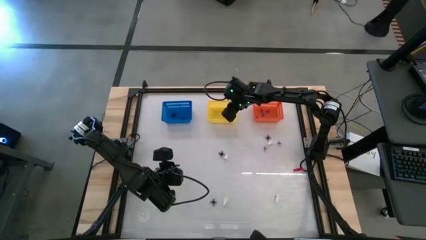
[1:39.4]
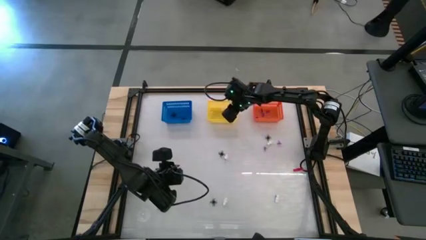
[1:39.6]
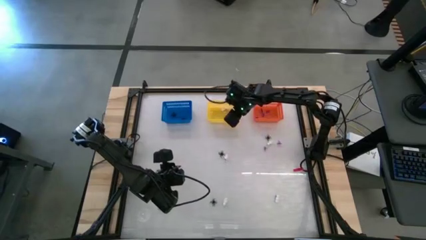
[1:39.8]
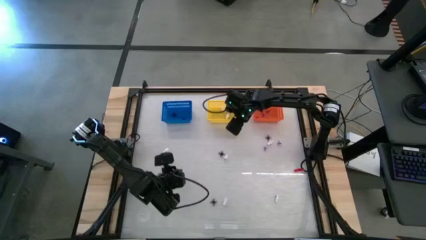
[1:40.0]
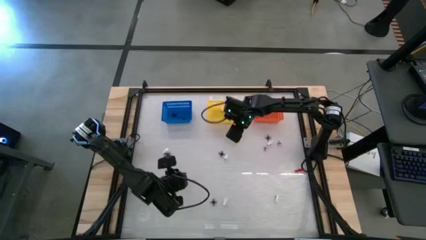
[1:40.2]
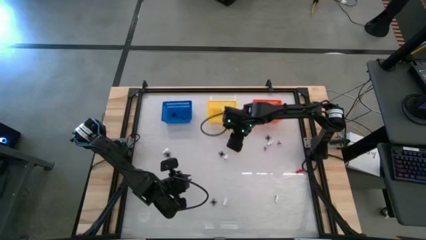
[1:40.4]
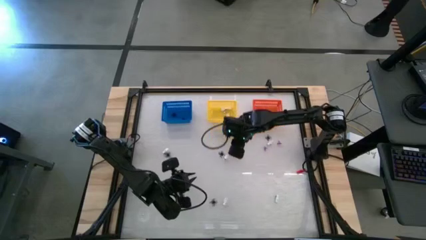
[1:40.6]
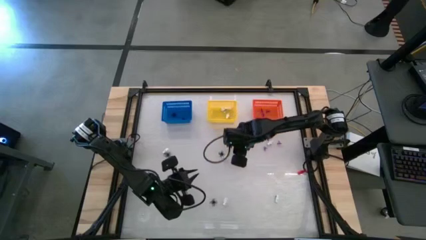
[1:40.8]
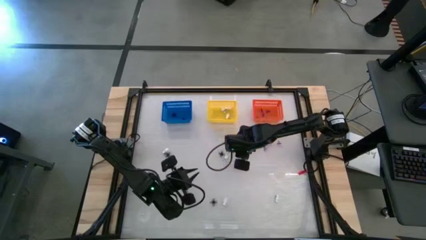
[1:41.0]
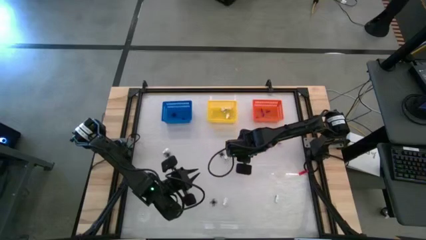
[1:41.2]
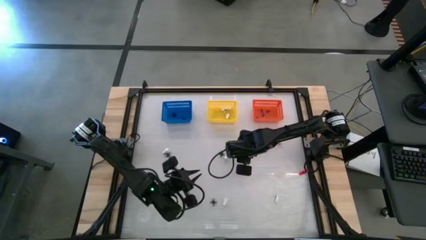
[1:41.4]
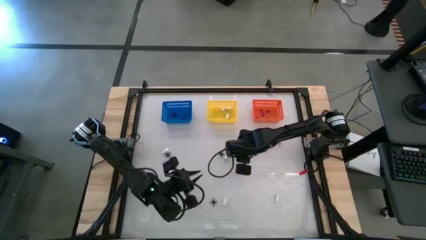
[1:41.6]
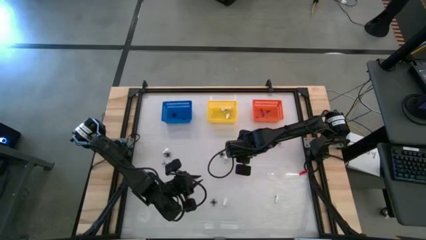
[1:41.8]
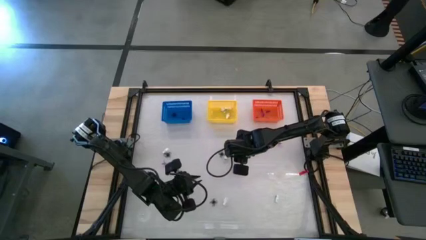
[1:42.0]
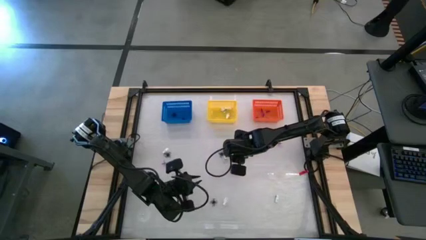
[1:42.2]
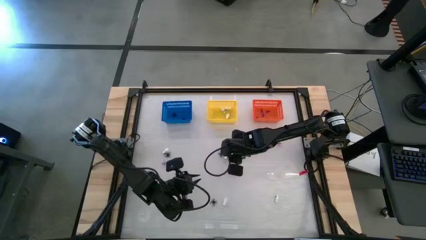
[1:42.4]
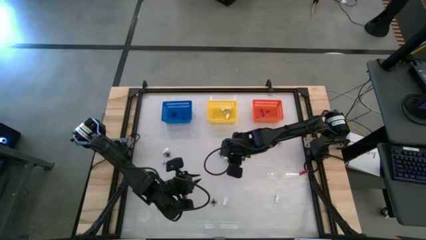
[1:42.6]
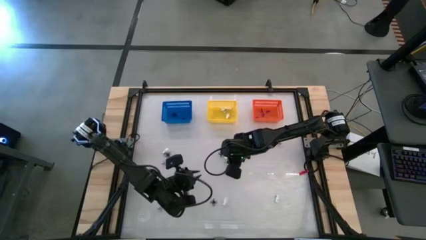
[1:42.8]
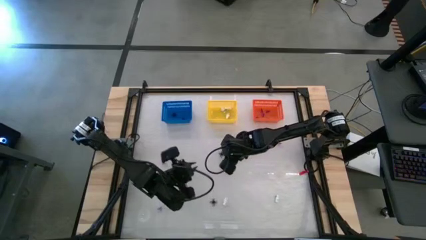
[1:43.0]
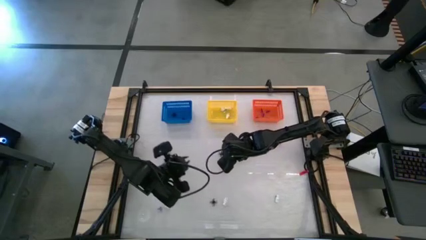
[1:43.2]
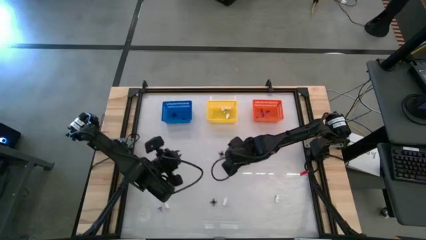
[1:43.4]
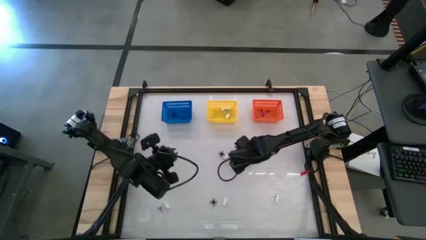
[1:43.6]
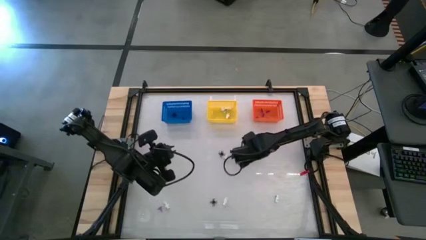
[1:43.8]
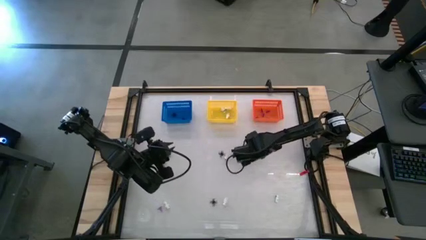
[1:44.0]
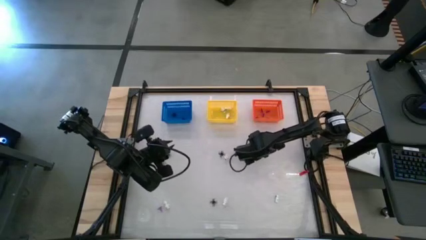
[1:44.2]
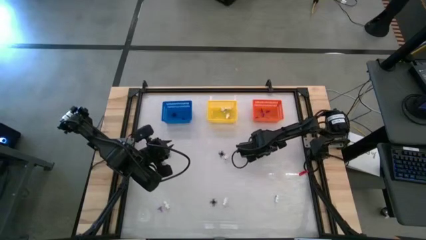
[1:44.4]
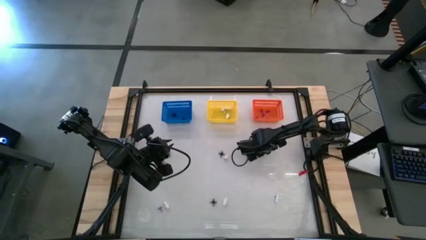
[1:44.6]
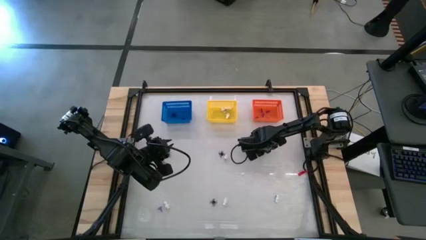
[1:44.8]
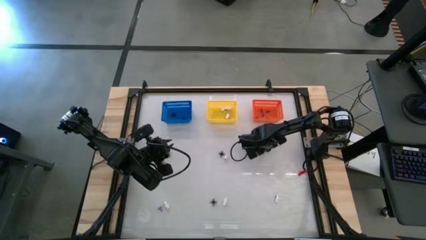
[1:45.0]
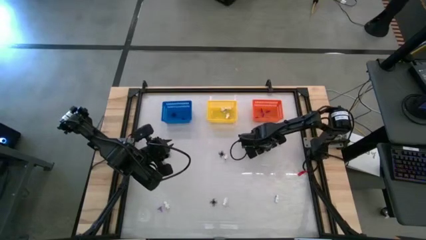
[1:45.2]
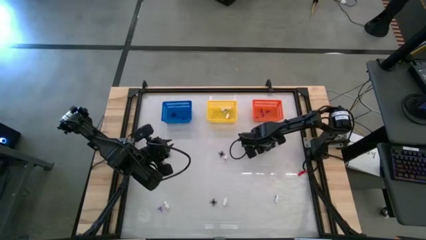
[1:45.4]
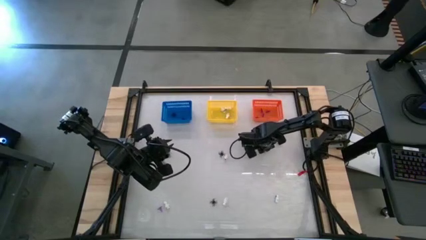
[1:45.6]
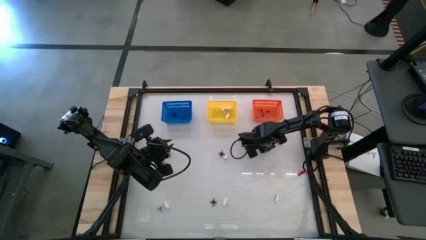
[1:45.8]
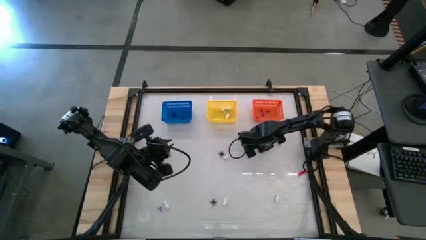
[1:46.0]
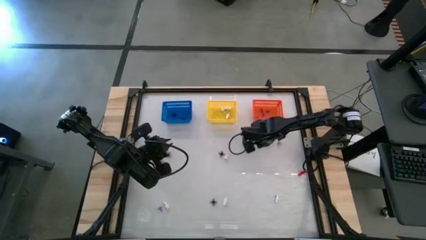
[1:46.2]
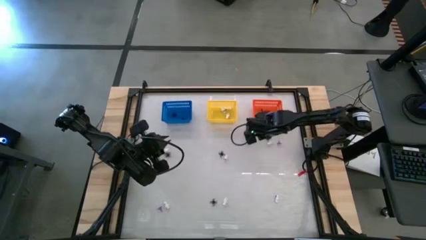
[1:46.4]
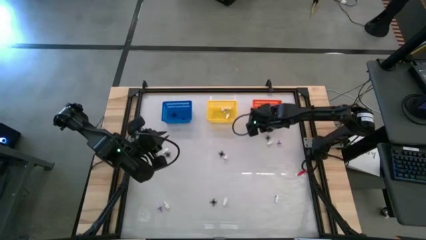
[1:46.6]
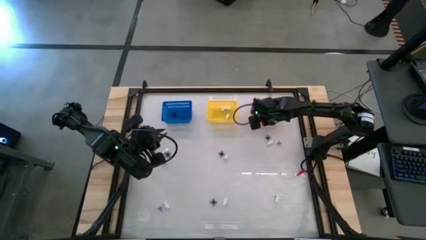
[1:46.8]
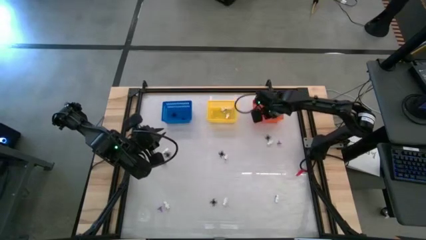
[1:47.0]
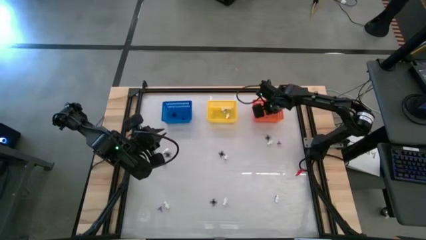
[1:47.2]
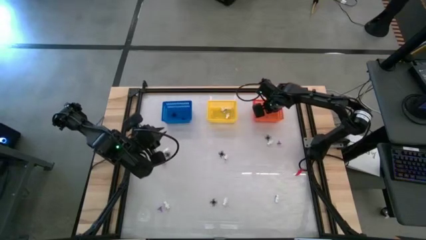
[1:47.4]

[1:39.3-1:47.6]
Task: Sort Halloween decoration
Put the purple witch hat toy into the orange basket

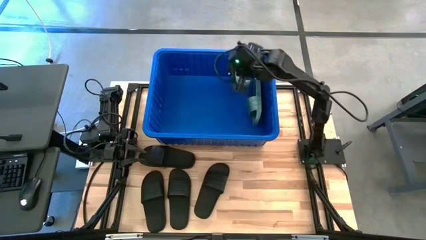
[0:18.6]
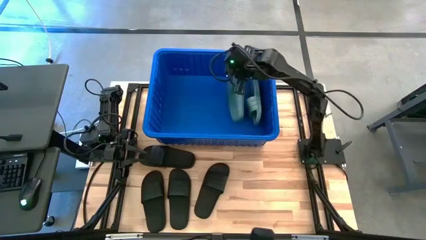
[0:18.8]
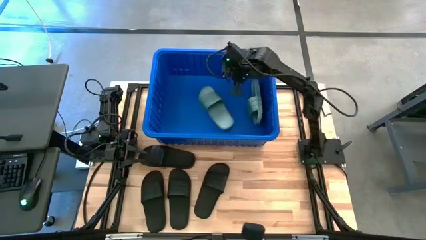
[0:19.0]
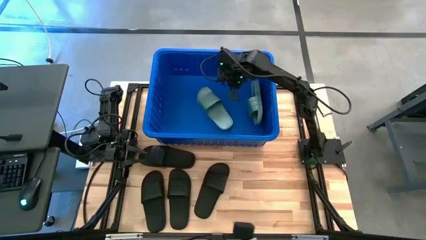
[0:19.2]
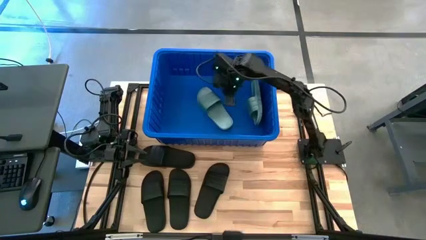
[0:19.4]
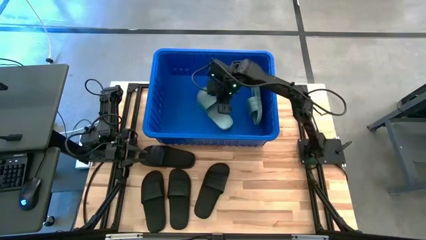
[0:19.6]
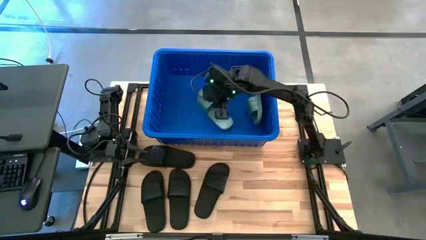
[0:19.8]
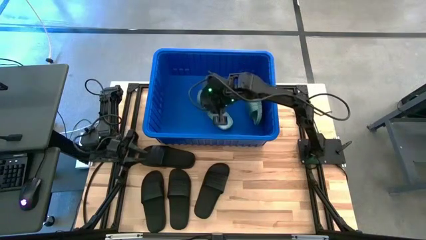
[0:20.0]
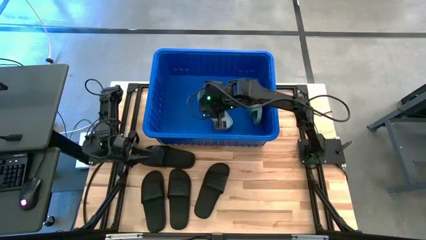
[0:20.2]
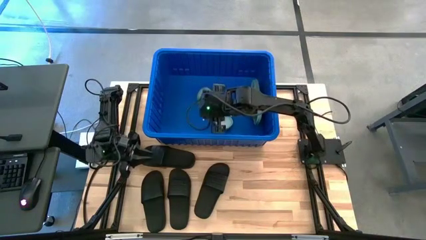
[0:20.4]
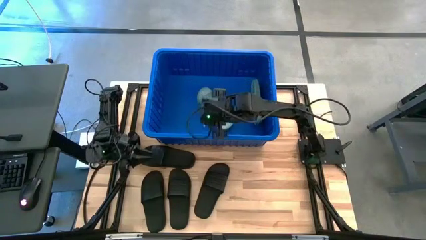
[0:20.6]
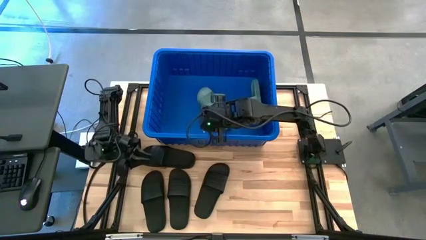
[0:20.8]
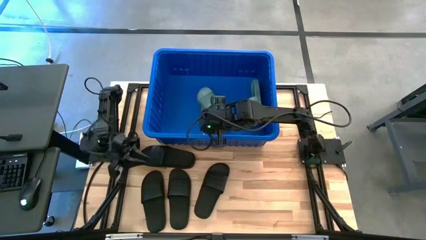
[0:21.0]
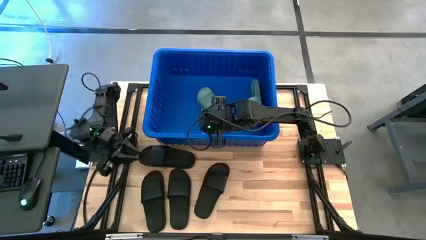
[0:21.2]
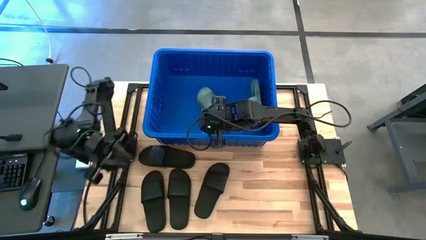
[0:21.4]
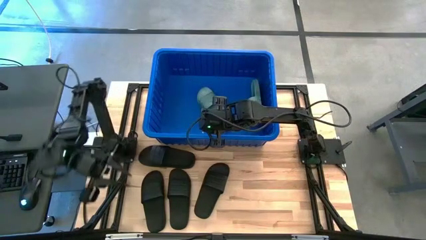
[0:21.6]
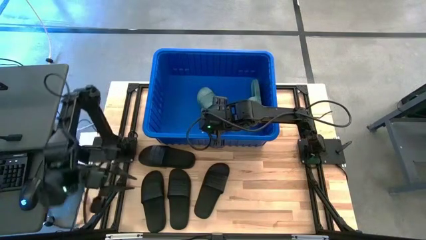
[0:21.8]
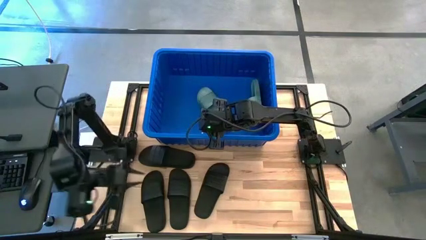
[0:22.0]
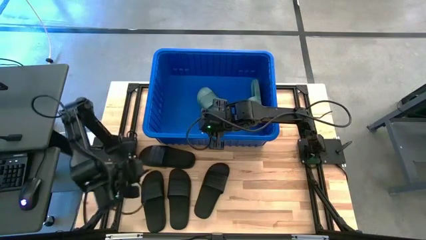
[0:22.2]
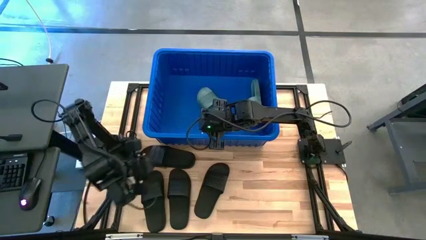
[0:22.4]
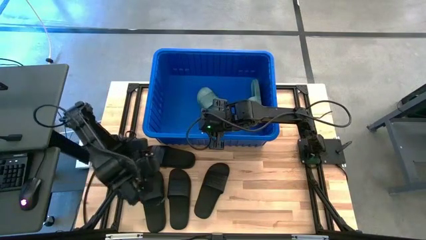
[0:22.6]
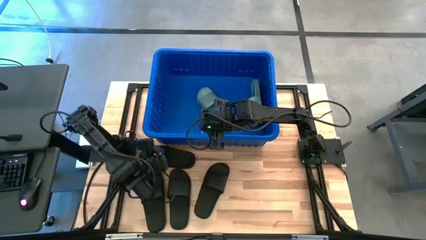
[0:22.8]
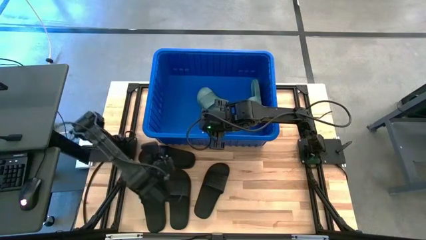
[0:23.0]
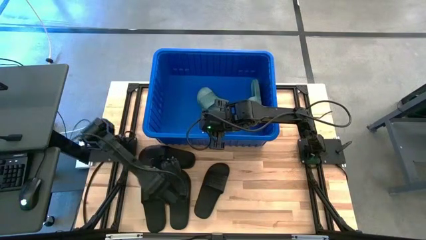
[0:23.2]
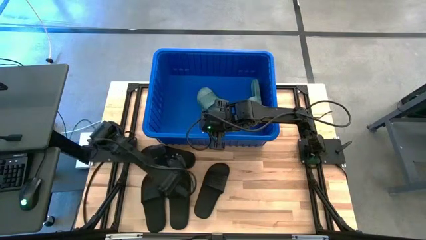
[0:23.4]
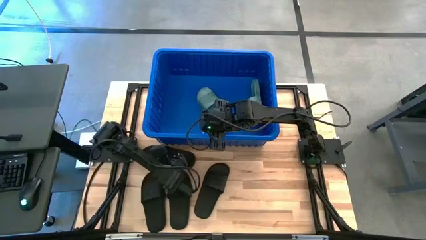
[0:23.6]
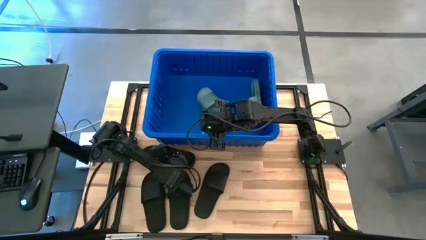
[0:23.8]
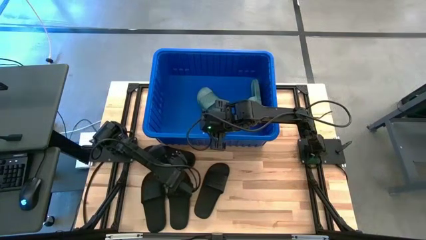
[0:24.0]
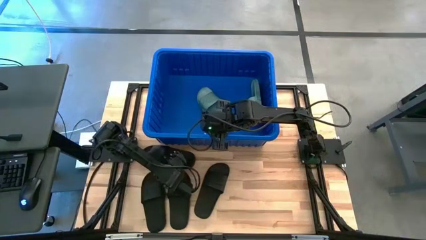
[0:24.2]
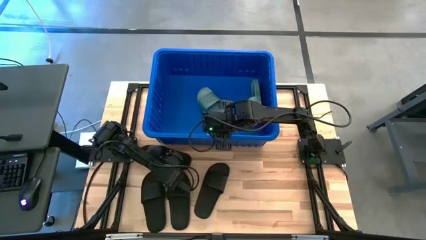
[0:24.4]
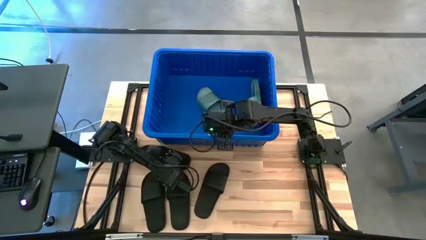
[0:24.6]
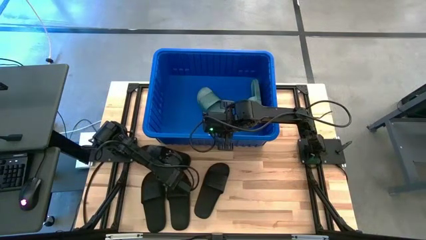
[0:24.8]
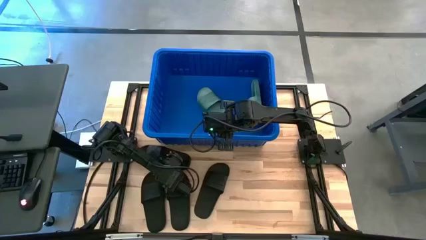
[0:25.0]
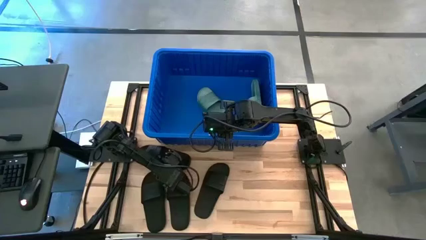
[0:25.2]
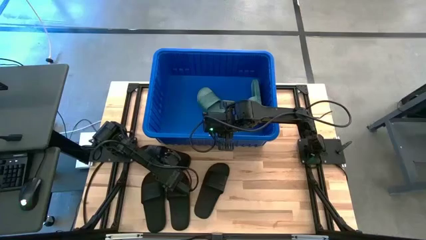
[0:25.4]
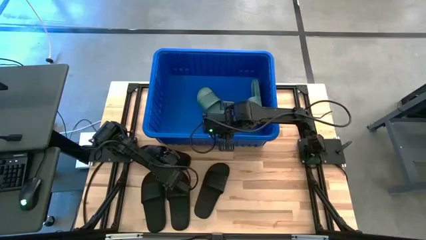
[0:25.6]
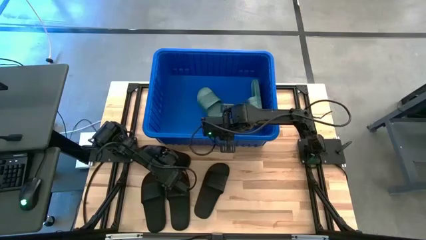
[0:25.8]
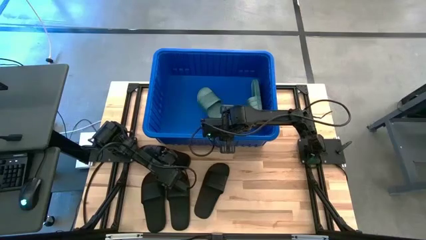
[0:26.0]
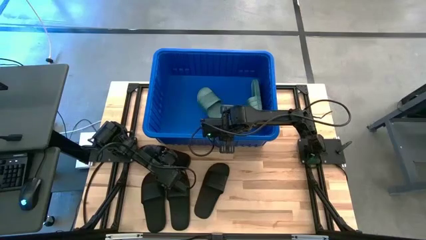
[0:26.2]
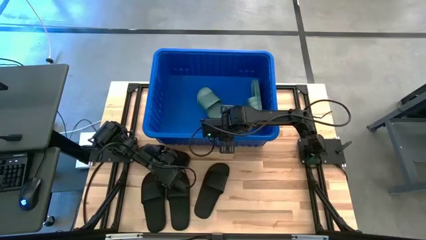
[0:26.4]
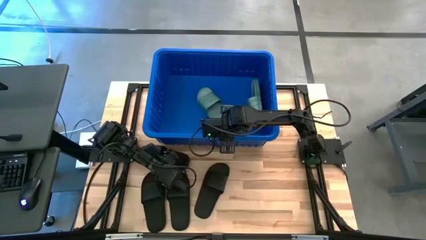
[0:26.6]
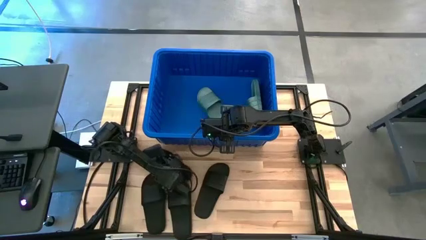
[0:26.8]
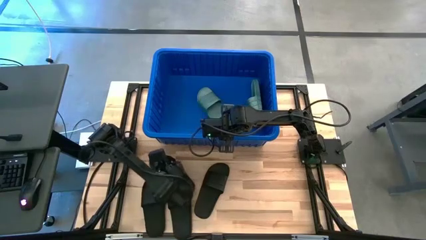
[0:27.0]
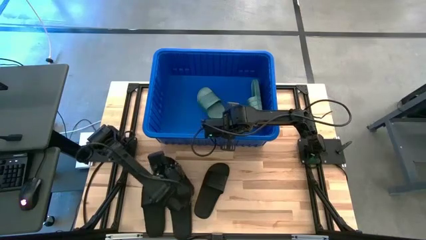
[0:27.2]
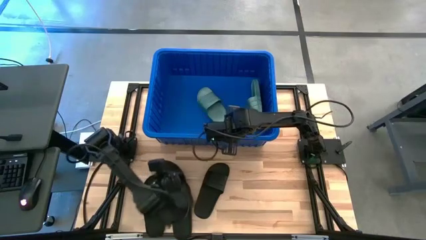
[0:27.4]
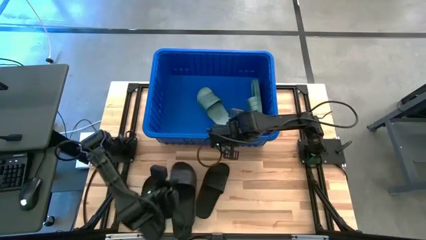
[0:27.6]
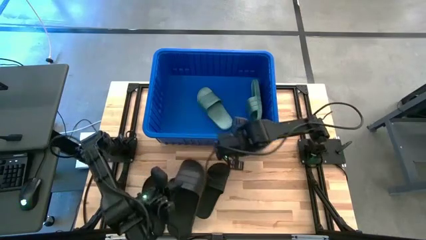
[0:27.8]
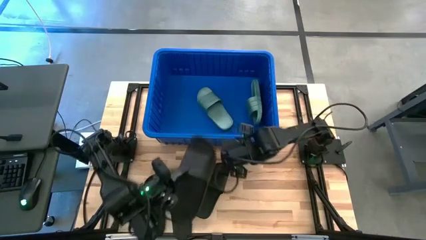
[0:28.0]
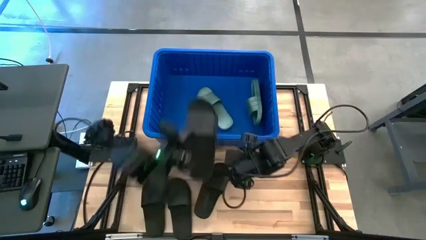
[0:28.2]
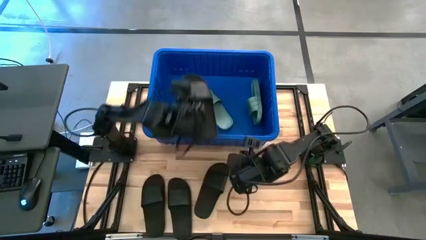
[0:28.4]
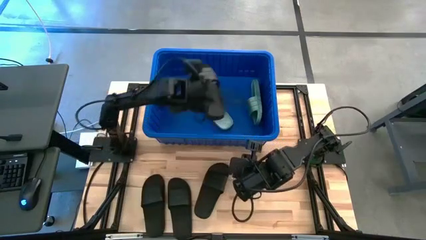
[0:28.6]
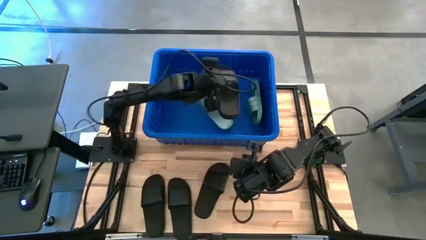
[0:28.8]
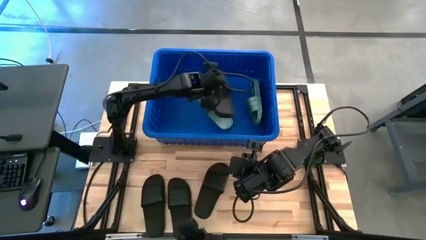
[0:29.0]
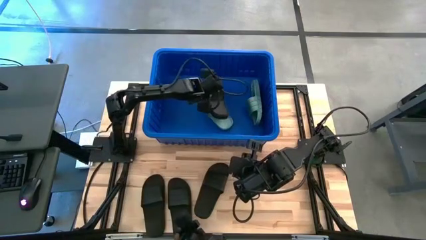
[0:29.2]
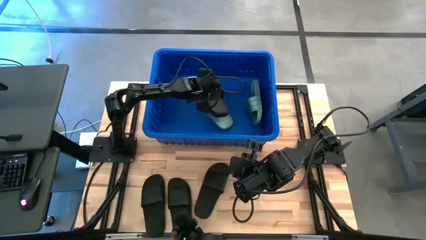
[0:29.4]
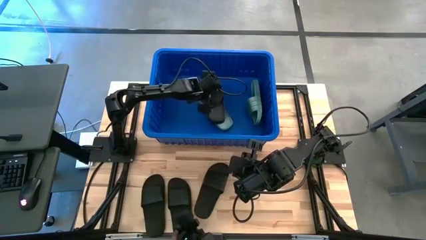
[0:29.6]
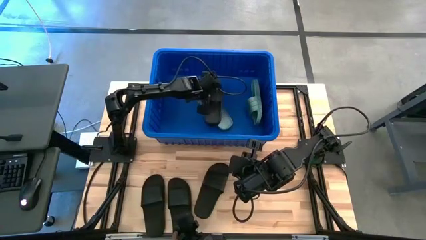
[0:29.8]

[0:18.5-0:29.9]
Task: Pick and place slides into bin
Put the black slide into the blue bin
